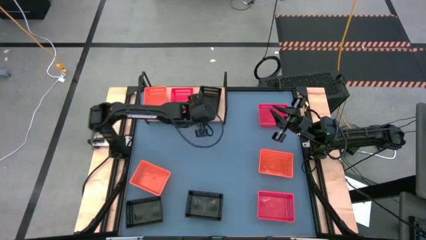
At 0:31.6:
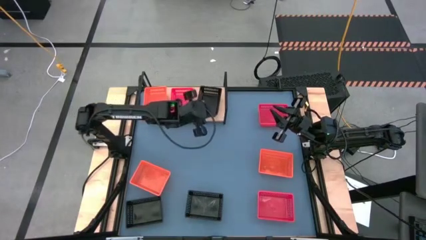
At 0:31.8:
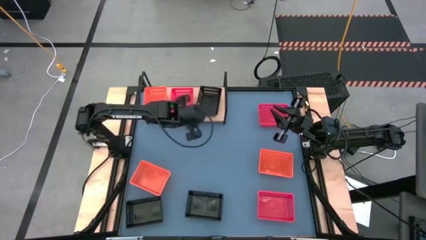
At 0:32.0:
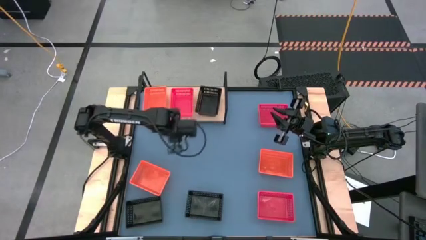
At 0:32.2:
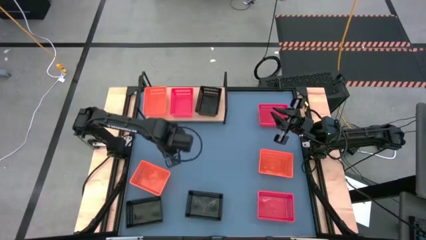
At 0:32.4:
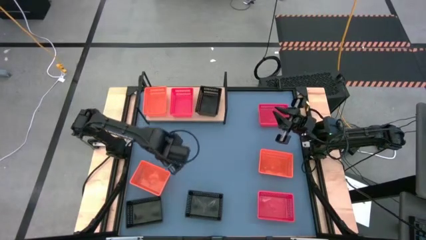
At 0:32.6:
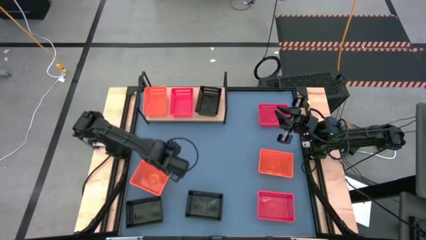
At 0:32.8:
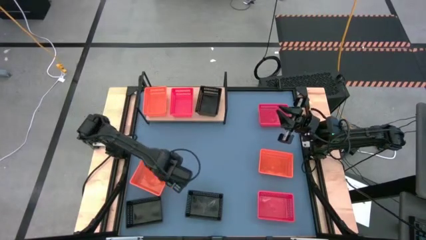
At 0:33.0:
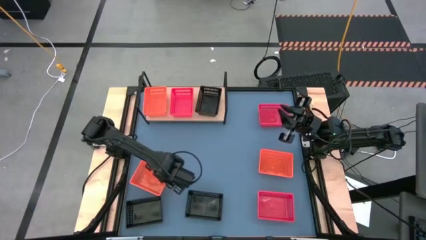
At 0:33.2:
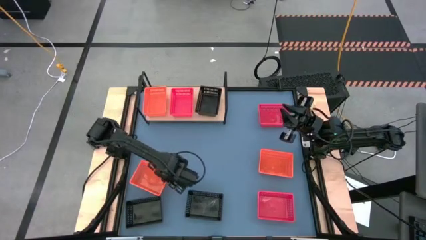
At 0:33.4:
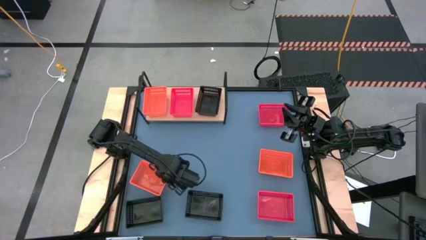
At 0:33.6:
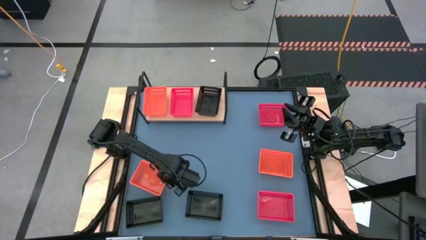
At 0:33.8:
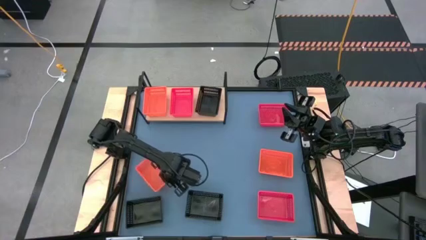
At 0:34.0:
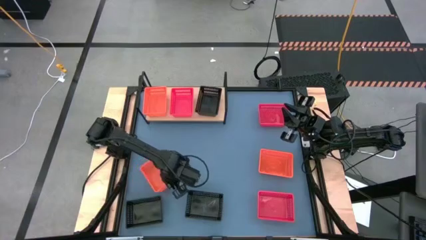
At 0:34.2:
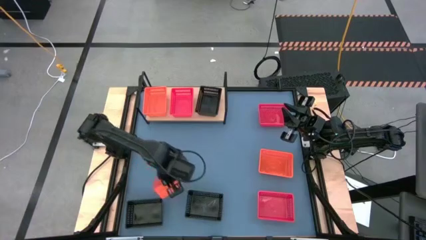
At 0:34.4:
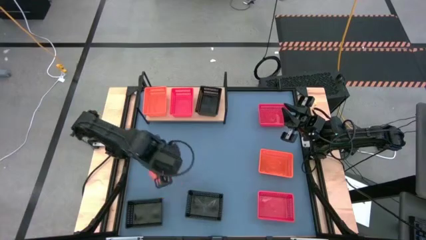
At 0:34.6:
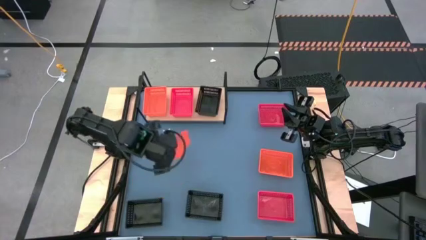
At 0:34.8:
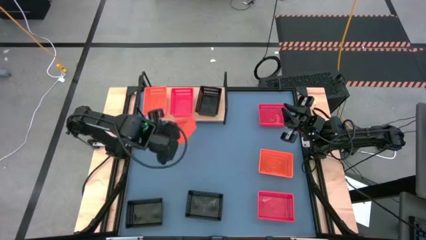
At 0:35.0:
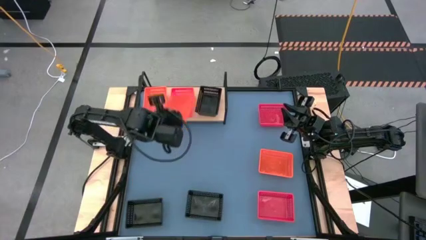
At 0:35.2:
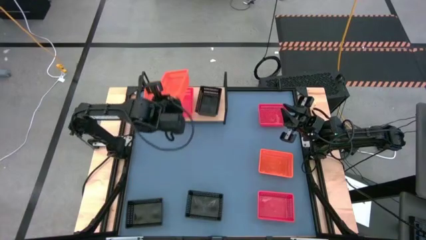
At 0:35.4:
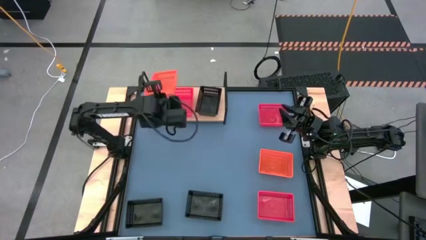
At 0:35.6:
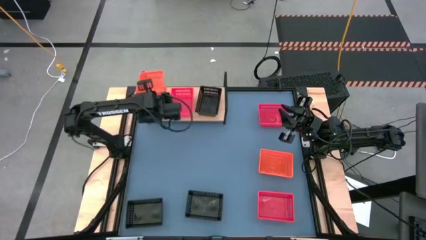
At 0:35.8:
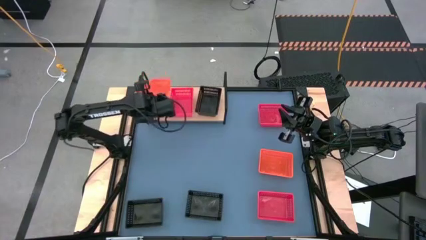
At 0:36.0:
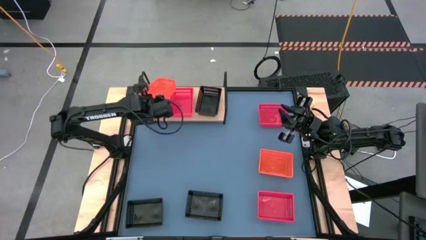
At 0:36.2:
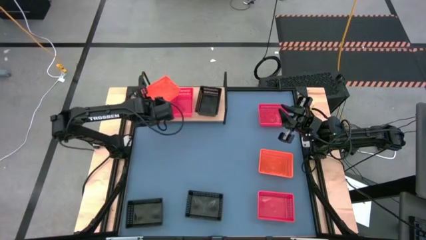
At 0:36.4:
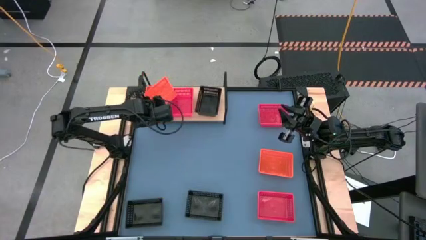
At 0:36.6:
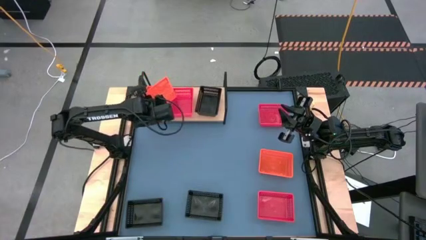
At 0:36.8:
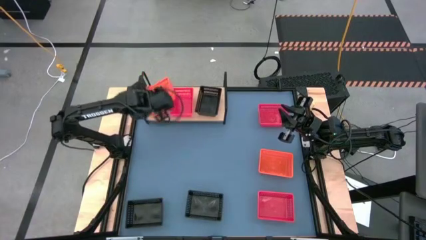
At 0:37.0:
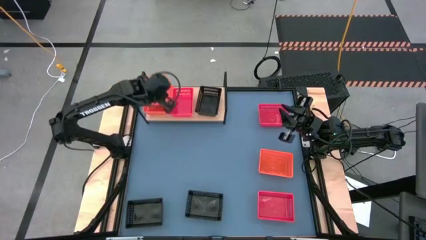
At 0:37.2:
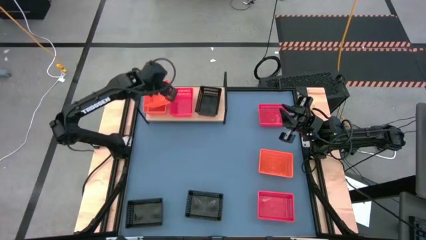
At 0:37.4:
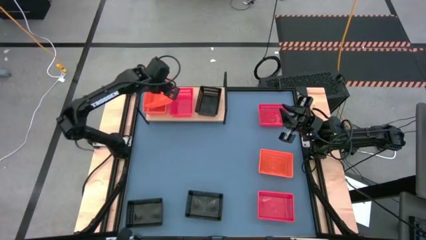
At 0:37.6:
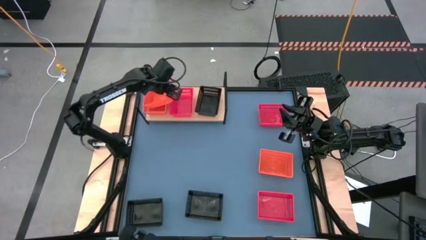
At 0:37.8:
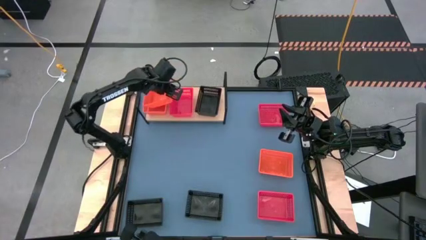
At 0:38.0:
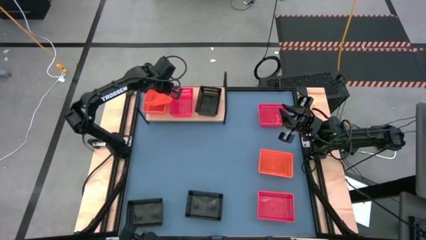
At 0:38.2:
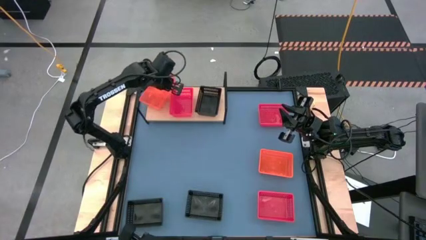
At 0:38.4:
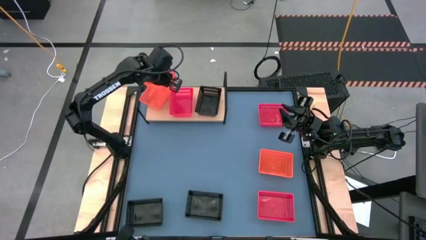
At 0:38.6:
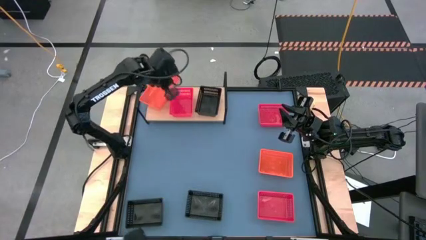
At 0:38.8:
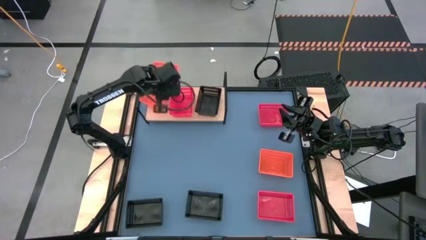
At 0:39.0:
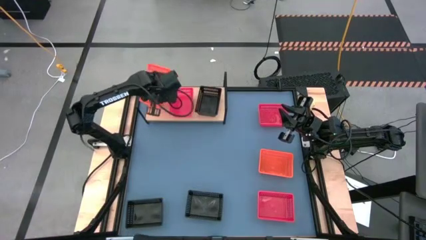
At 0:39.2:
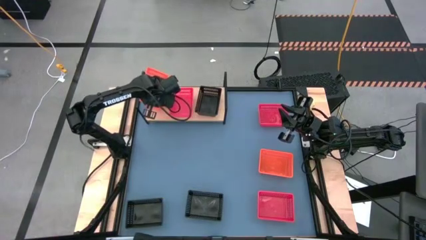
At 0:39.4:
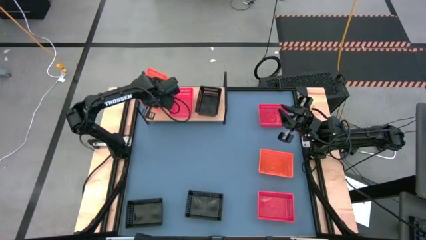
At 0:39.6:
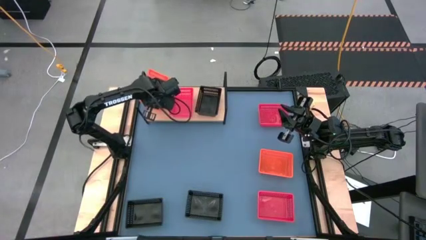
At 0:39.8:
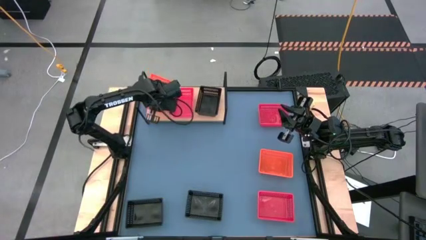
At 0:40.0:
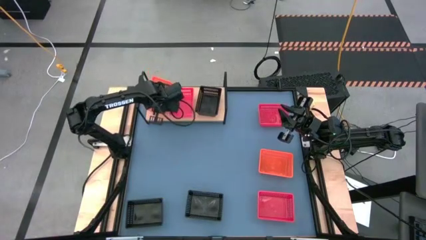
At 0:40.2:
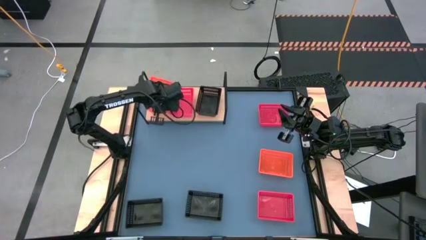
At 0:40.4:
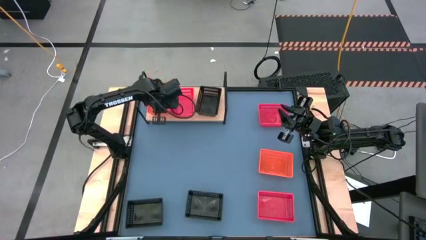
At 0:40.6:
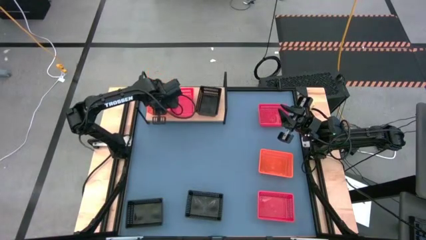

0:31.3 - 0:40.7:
Task: Stack baskets on shelf by color
Stack the left orange bin on top of the orange bin on the shelf

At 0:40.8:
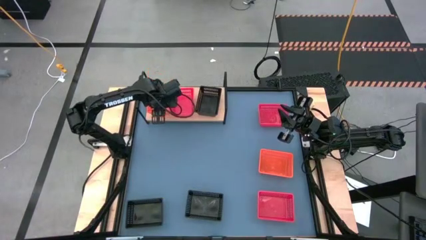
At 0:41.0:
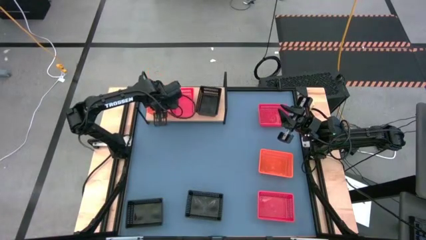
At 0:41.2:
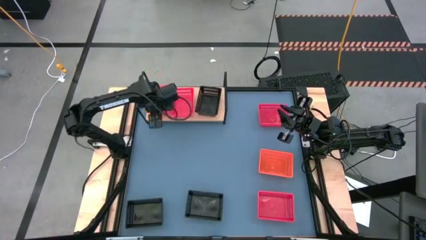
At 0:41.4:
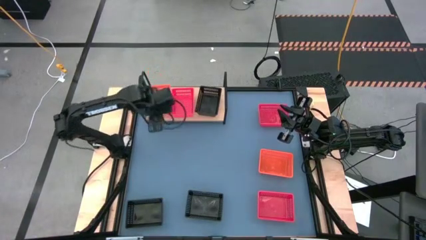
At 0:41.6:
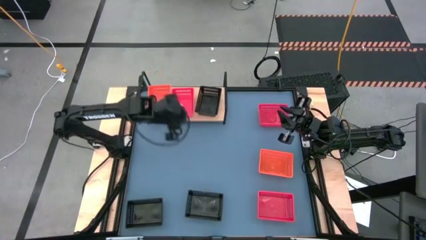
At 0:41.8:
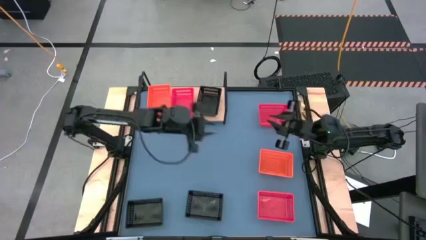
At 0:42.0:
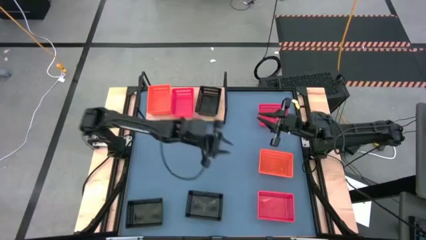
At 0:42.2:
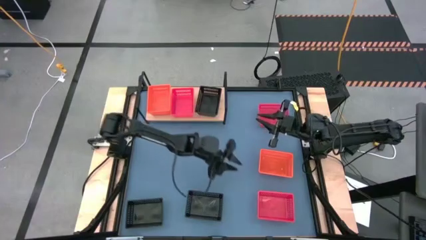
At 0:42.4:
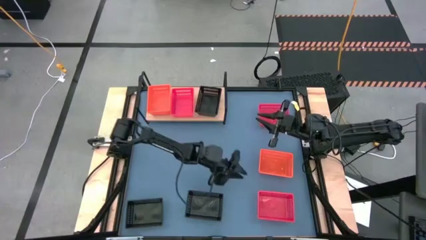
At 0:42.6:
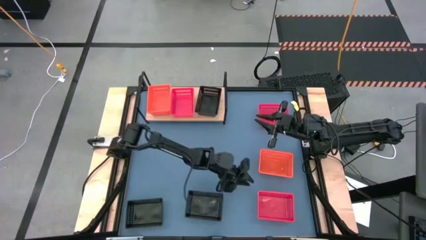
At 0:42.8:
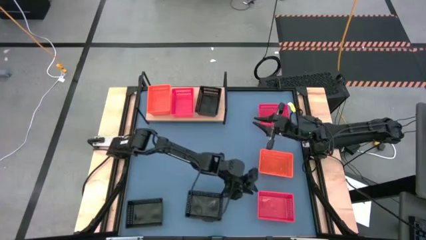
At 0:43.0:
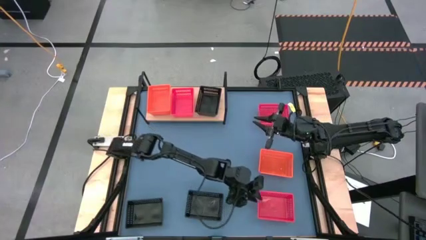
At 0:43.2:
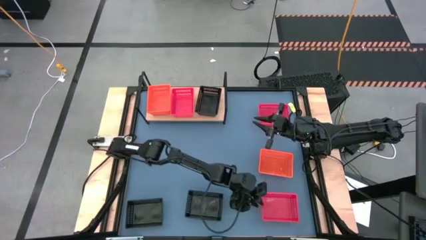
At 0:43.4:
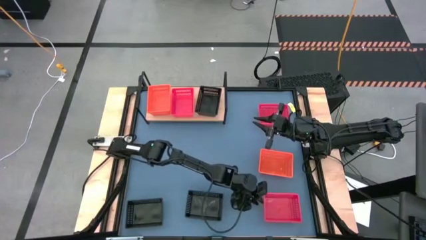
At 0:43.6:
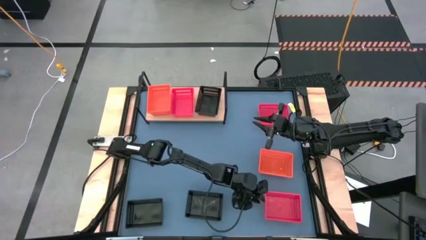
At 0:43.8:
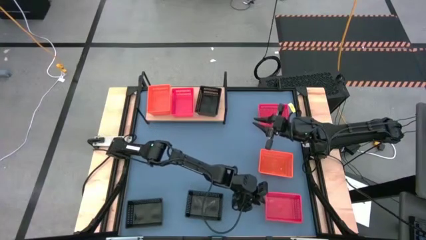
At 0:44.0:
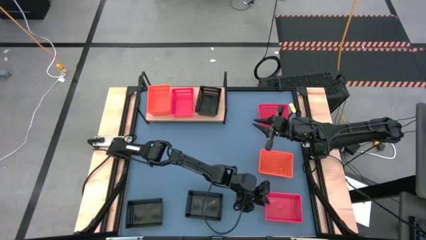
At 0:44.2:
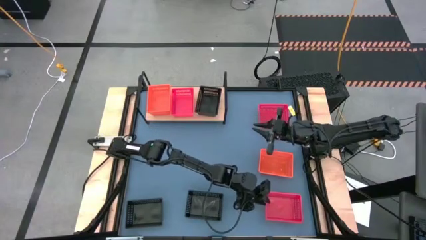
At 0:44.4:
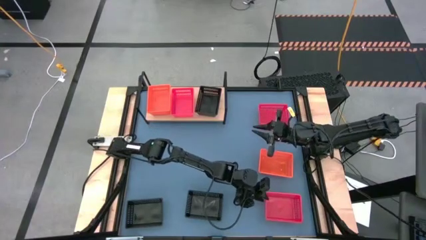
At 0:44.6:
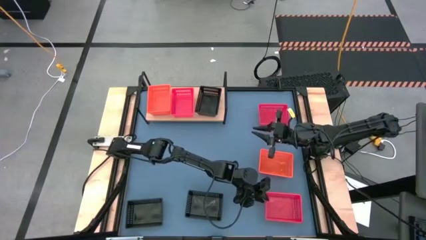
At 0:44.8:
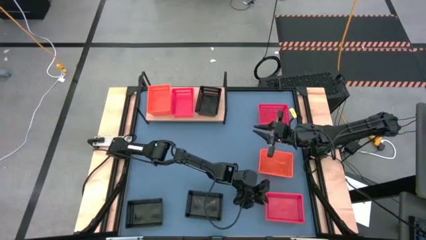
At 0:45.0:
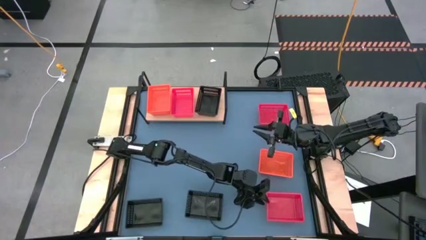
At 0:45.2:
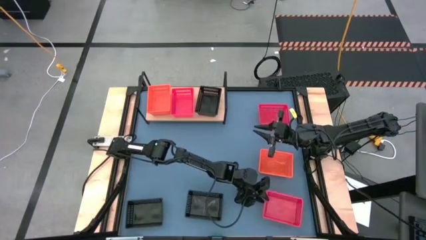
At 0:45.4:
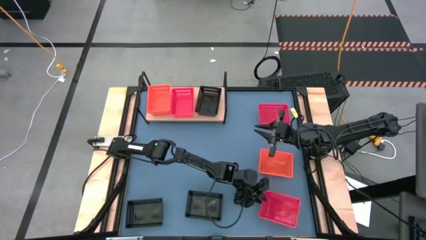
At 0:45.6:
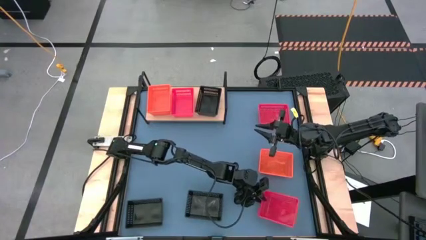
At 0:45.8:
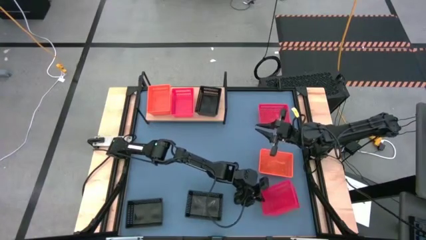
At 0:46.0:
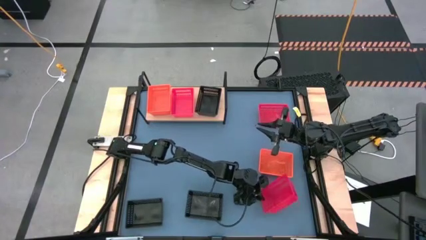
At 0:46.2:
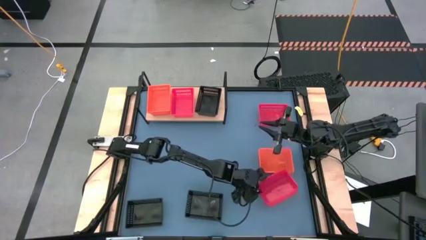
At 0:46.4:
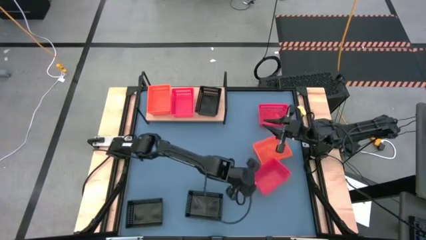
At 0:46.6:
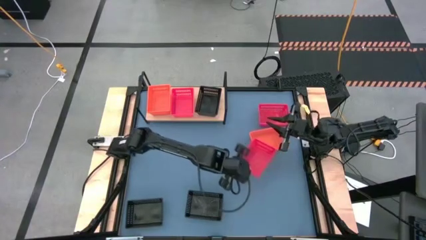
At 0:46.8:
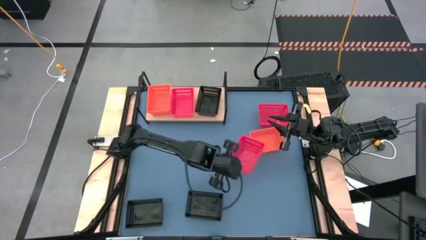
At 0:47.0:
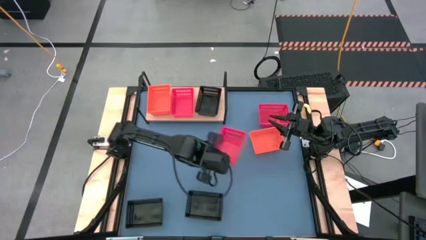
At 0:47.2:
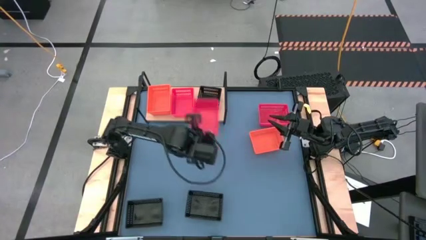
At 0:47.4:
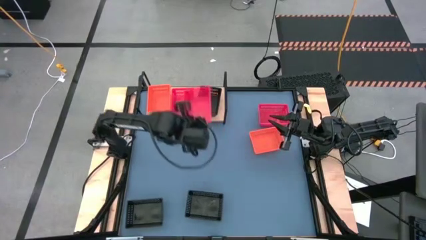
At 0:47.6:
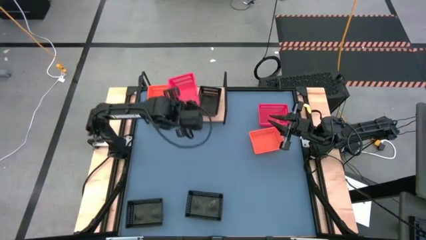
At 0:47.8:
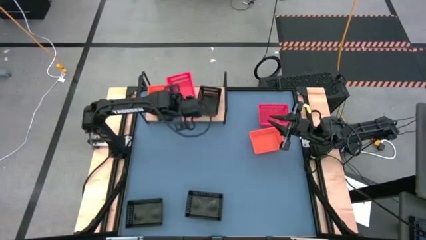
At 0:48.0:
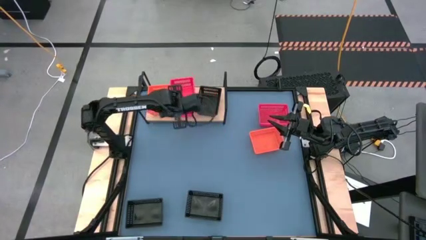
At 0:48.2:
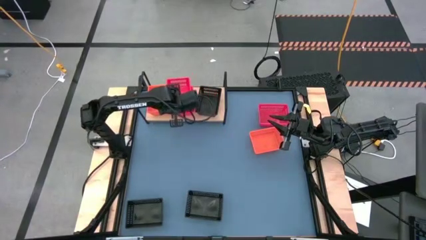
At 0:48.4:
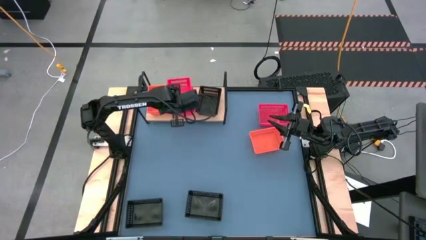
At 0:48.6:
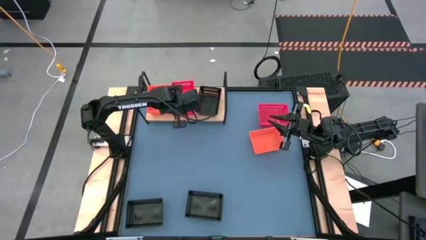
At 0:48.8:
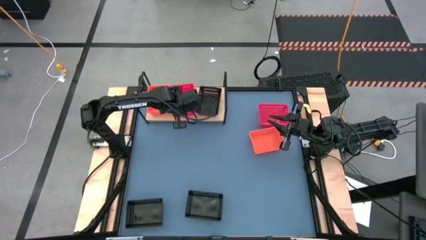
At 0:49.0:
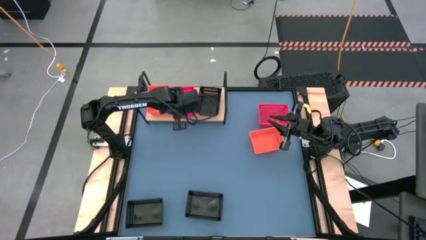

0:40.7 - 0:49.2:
Stack the bottom red bin on top of the red bin on the shelf
